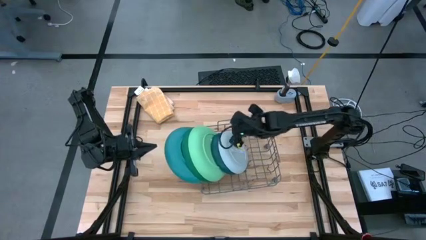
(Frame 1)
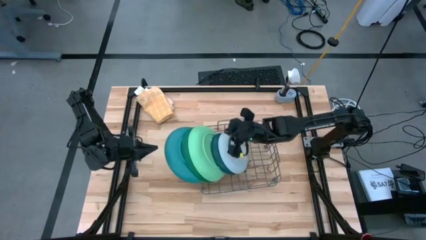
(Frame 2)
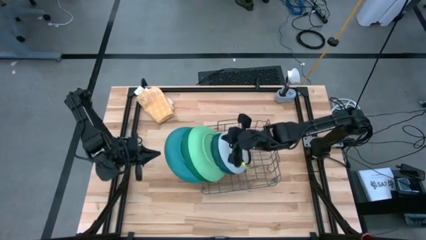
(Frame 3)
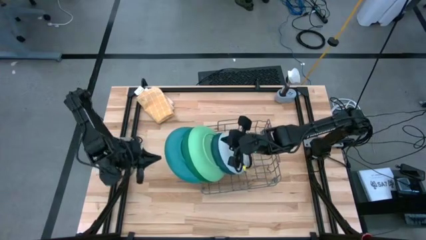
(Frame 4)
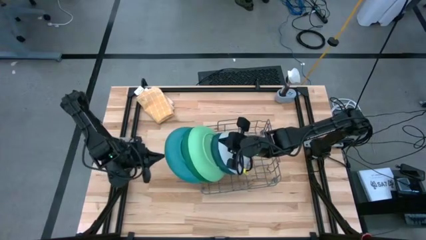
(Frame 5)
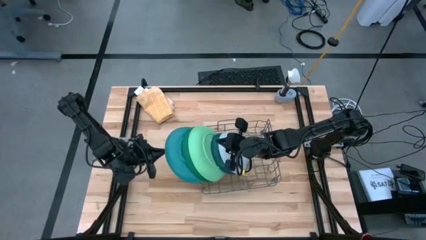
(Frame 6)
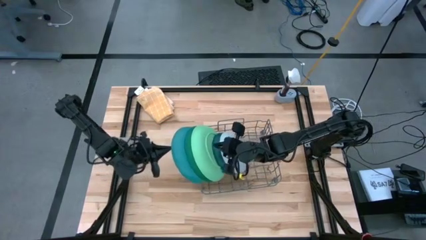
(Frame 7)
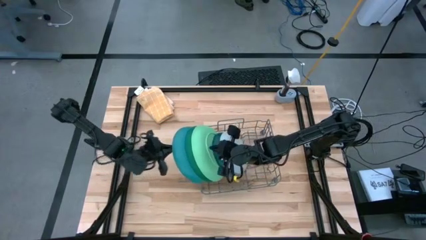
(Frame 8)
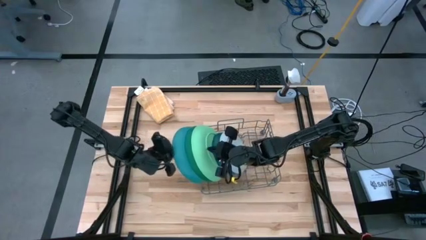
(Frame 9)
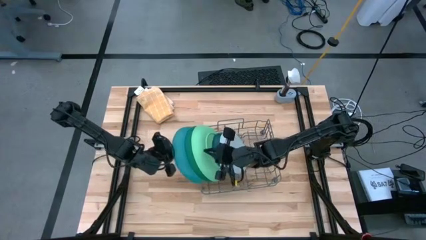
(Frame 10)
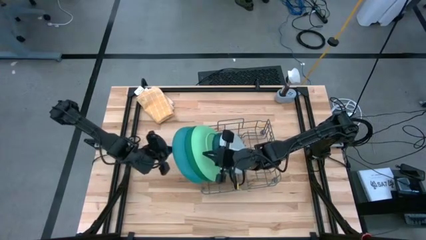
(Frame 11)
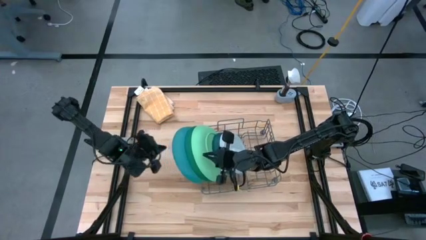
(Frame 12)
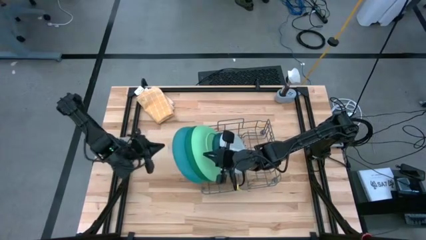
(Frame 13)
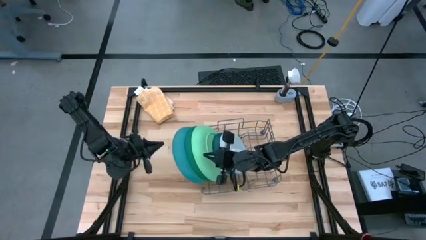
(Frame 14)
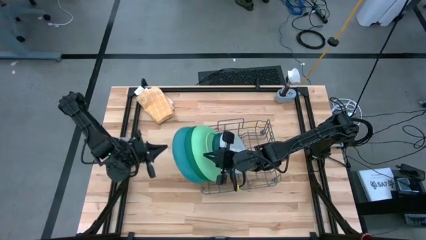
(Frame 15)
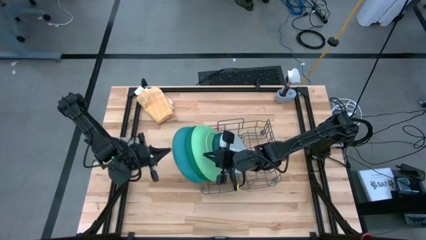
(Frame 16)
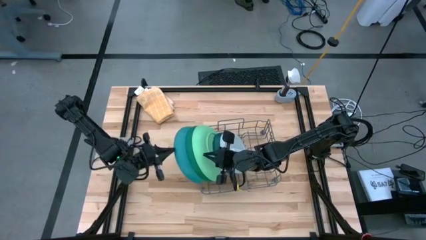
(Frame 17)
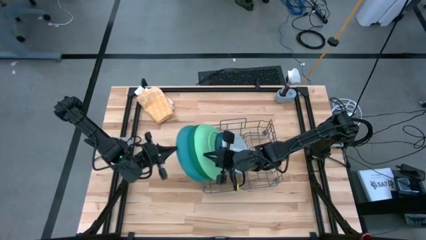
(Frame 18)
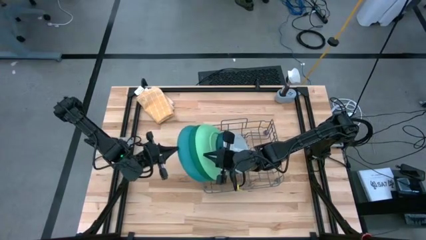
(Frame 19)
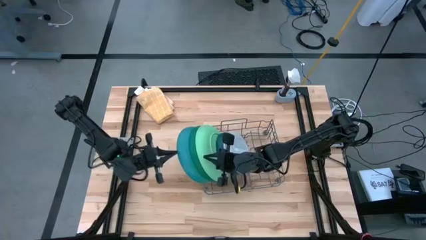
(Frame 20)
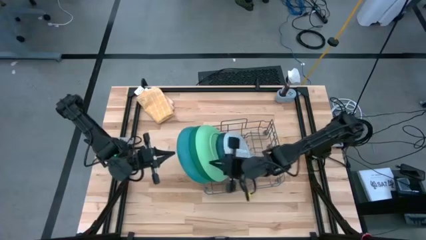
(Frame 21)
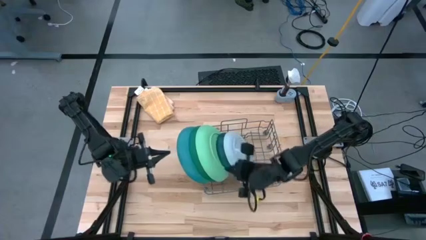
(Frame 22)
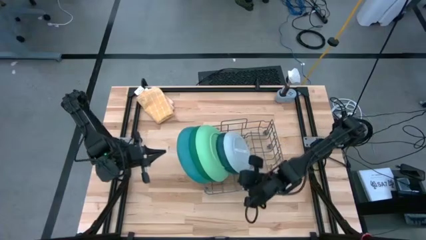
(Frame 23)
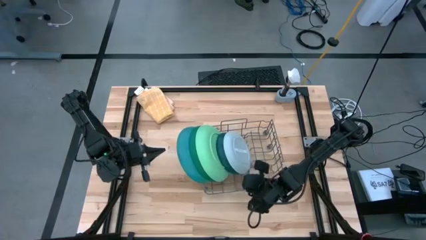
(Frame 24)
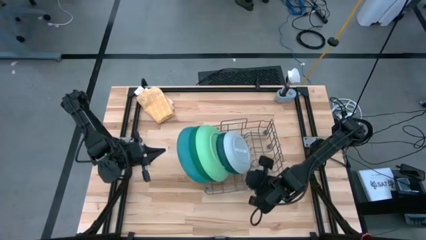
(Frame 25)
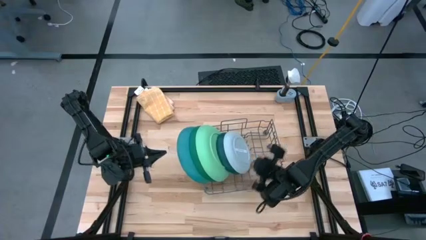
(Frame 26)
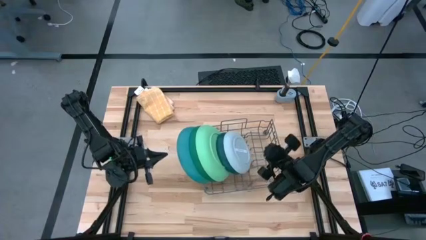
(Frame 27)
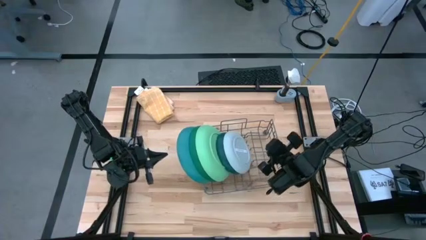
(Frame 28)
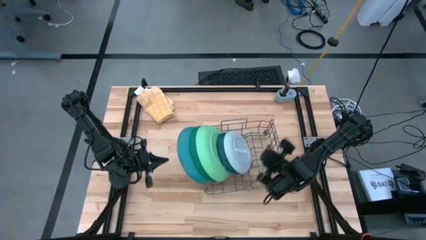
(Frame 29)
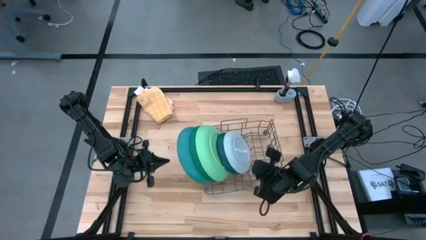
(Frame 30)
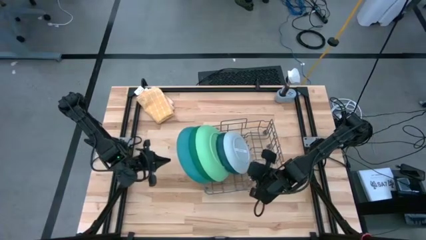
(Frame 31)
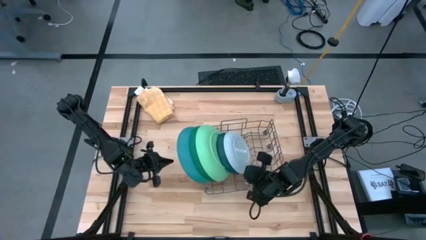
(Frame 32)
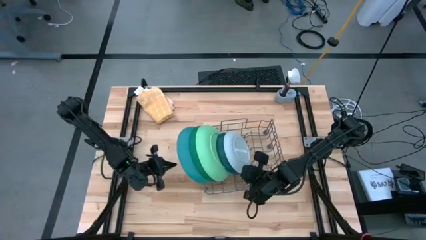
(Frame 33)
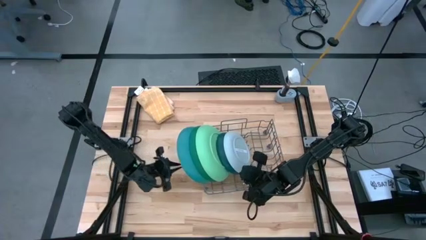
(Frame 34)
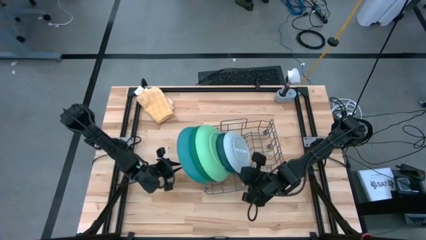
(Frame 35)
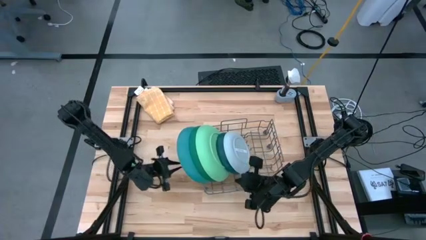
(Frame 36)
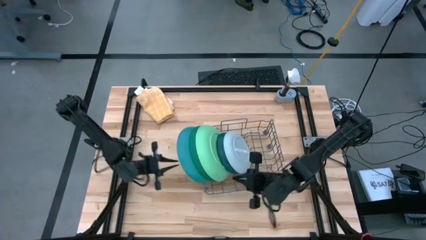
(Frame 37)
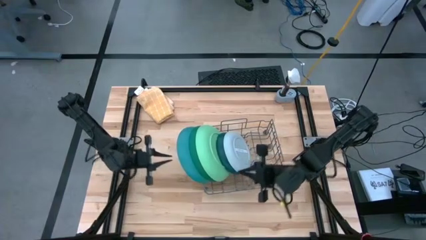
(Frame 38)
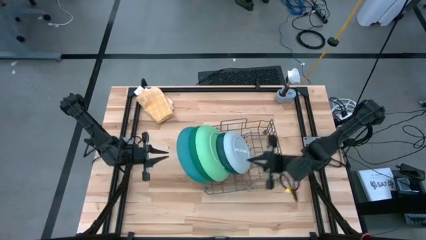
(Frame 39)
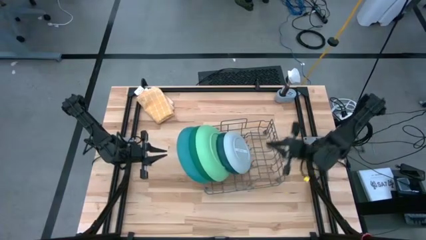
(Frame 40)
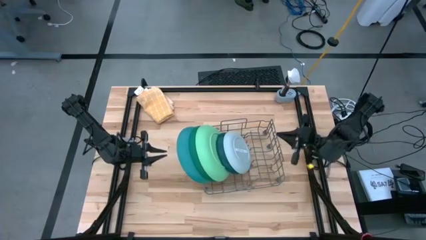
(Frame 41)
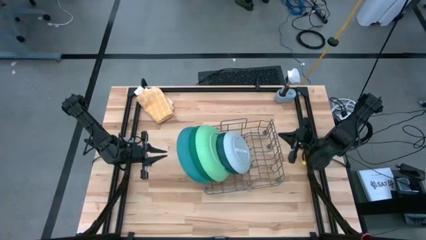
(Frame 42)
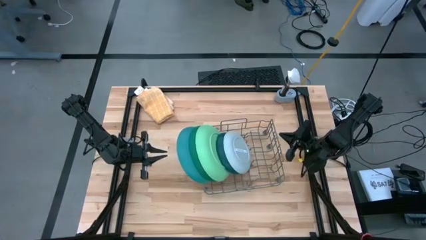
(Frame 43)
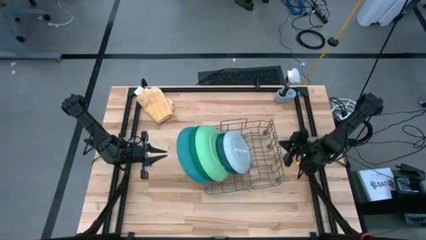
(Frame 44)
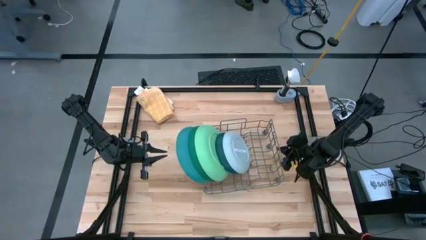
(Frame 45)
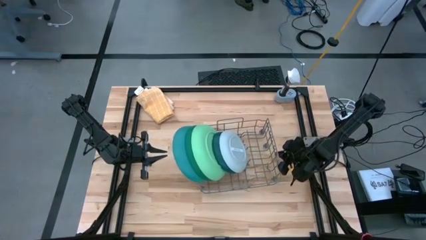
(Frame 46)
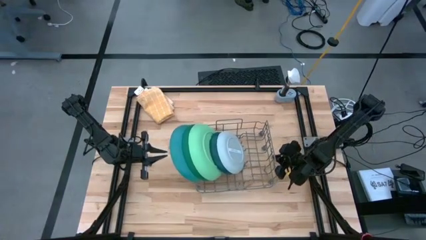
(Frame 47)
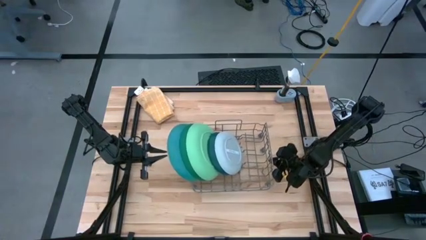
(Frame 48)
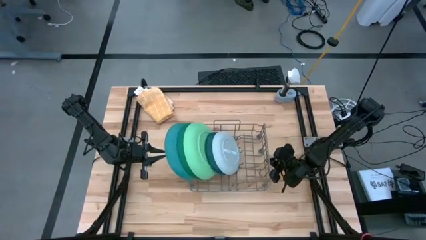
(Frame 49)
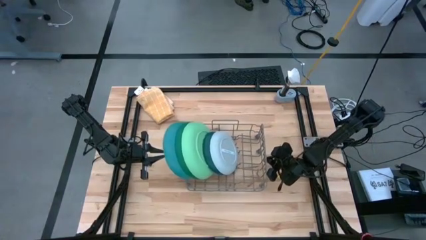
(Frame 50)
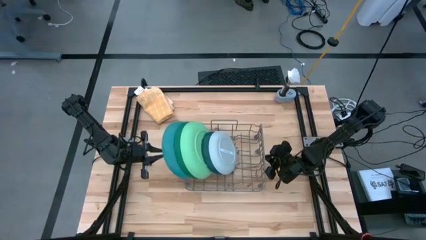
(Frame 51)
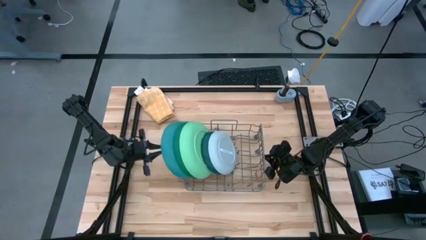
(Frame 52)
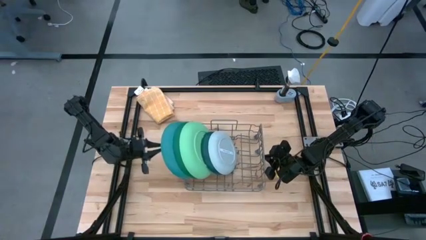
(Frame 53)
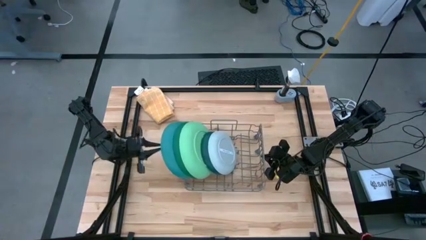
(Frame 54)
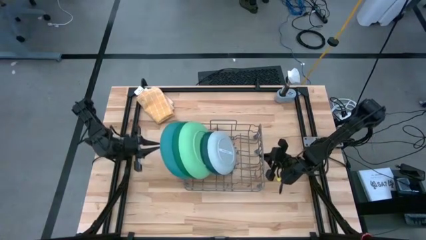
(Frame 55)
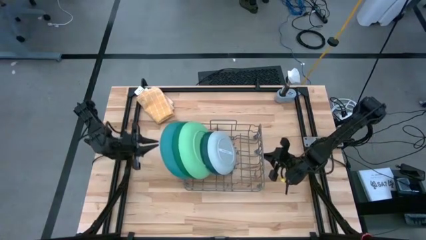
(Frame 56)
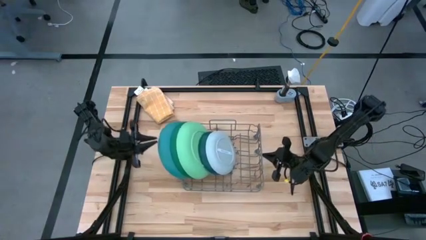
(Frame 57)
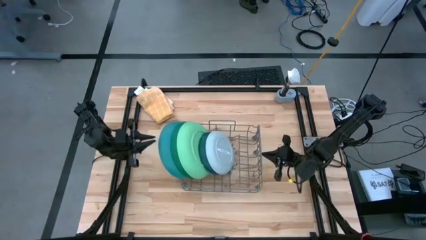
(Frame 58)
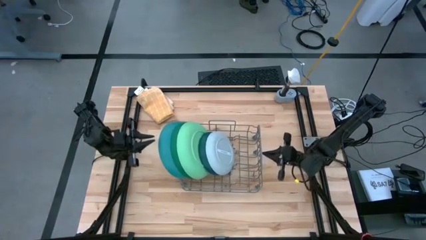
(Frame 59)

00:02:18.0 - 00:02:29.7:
Task: Sort dishes
Adjust the dishwasher rack

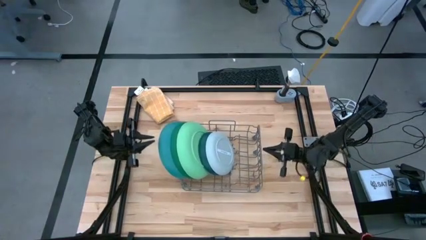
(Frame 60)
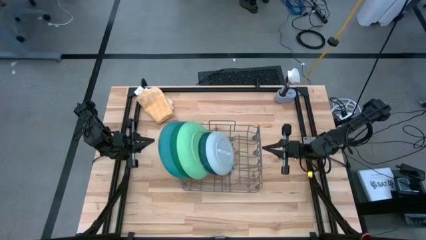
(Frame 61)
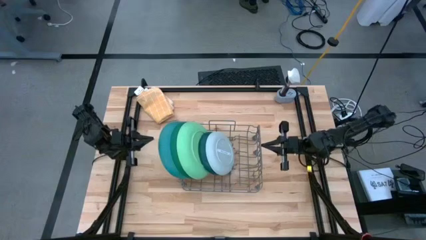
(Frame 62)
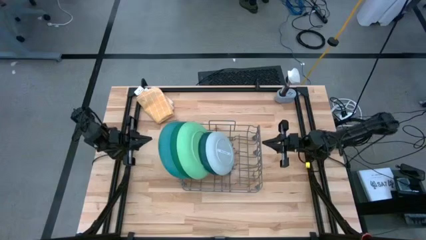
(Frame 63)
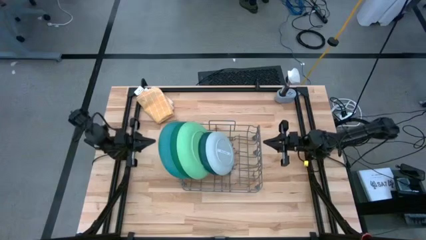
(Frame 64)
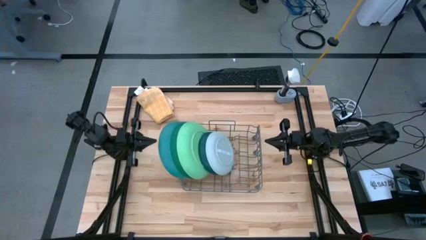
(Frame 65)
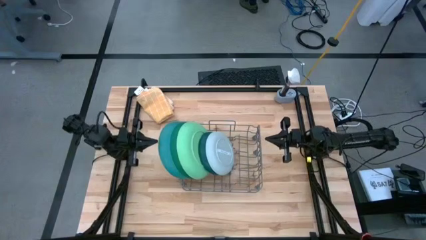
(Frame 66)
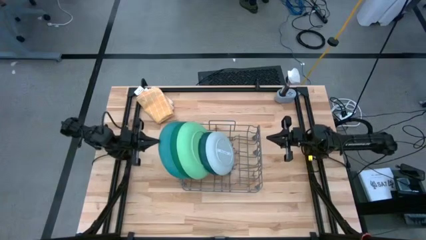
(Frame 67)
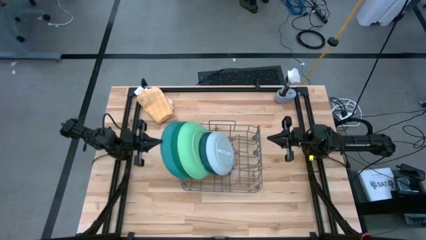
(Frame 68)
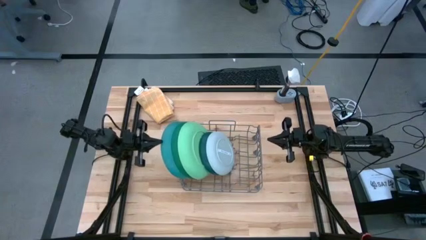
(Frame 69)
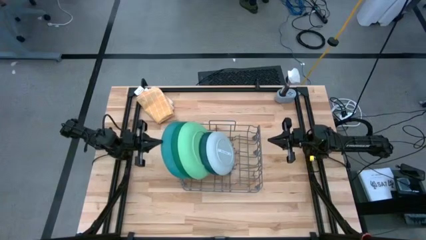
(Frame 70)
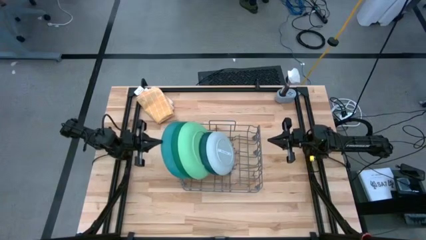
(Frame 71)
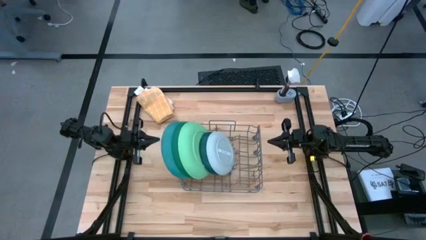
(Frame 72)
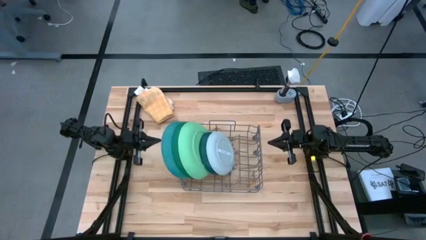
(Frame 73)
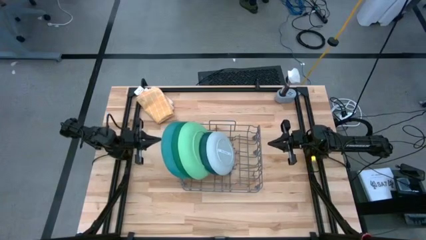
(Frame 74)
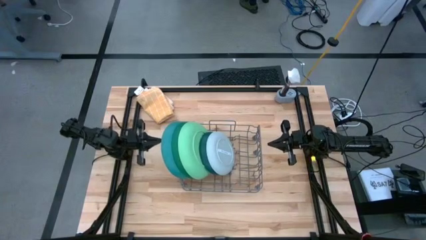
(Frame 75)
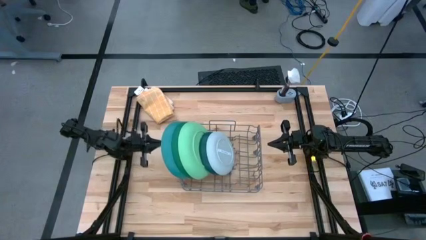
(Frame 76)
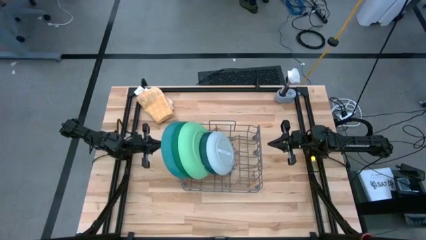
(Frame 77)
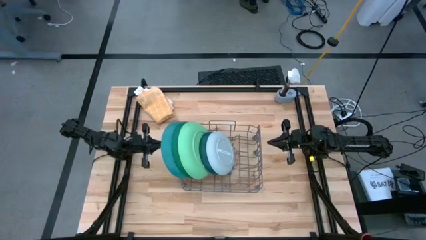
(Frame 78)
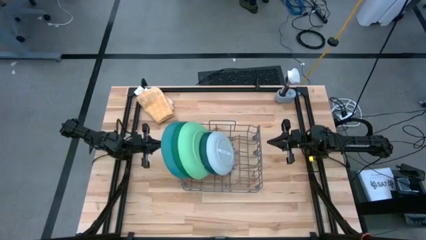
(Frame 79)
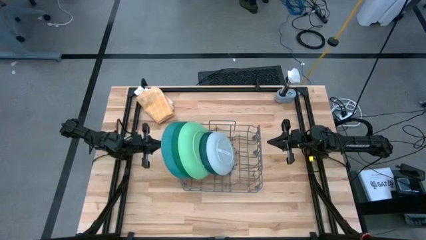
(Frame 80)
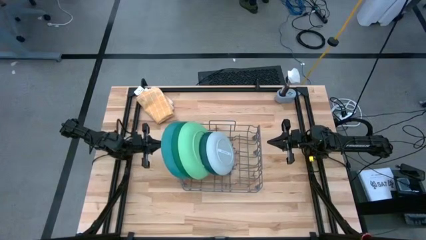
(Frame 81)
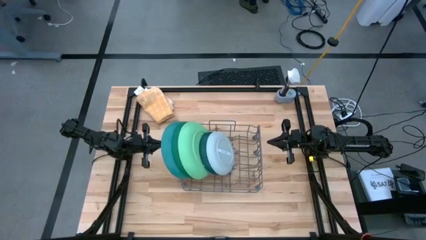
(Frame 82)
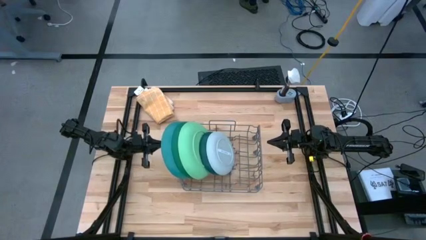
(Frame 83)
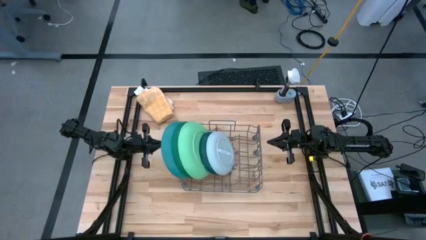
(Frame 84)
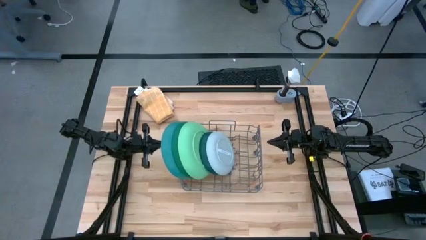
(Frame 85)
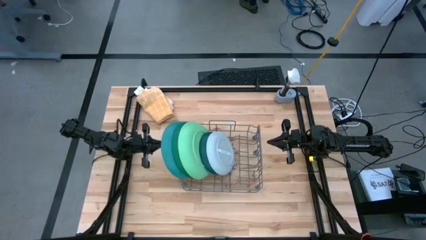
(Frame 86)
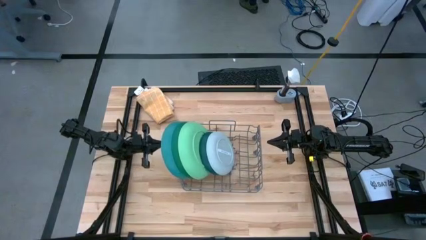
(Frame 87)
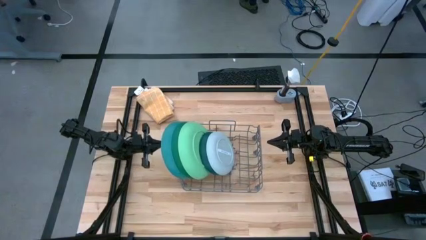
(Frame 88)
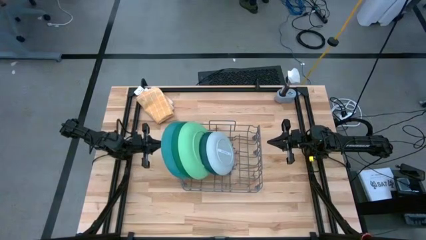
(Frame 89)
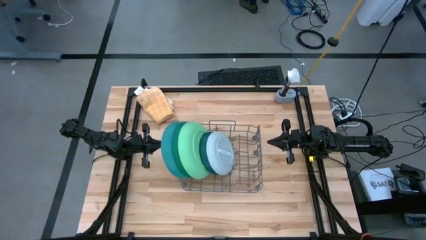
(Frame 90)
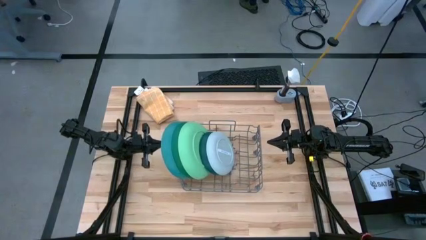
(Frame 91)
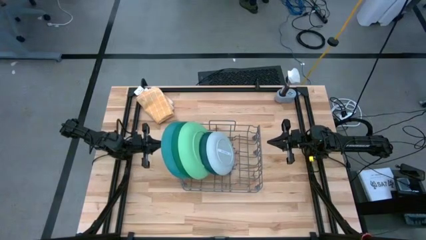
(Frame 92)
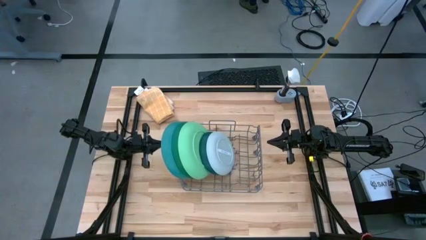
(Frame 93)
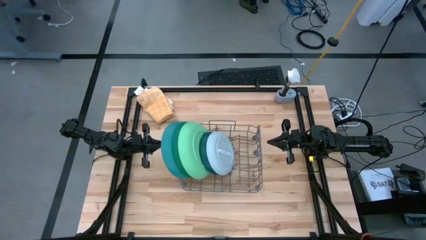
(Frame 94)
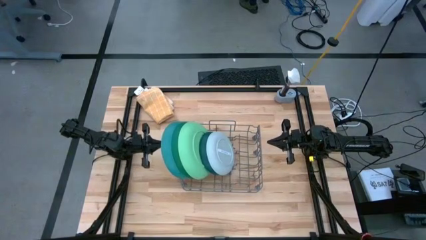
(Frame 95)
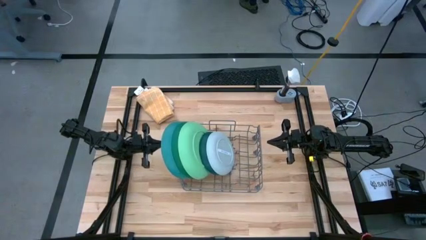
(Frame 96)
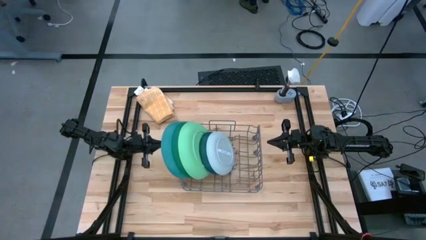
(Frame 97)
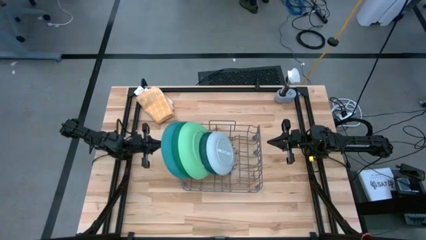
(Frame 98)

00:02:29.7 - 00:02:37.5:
Return to Home Position
